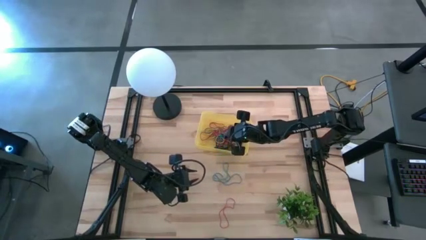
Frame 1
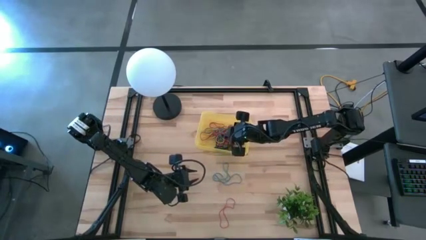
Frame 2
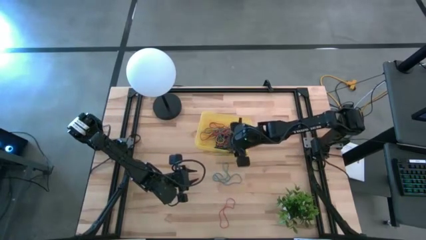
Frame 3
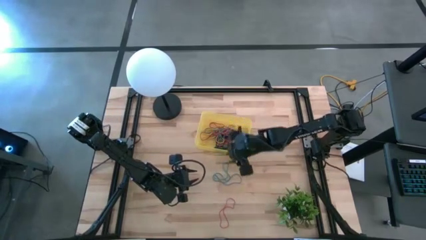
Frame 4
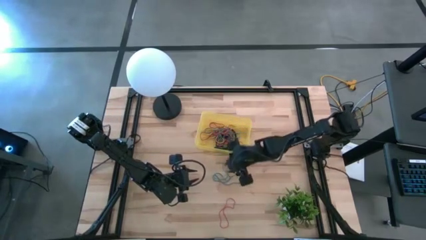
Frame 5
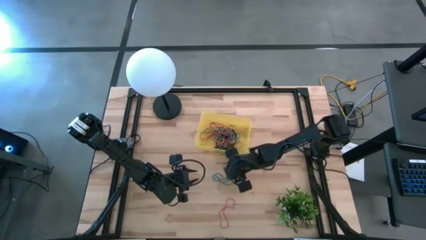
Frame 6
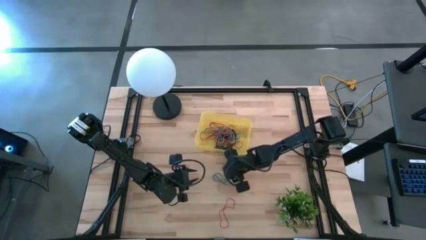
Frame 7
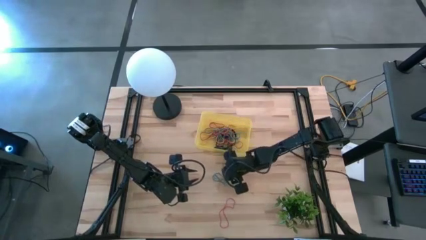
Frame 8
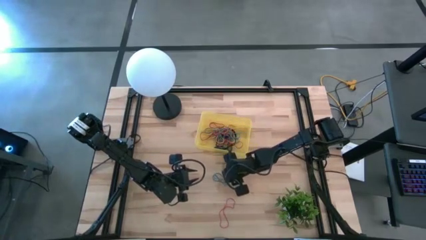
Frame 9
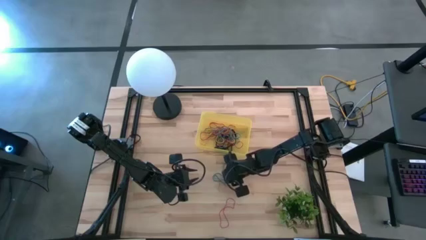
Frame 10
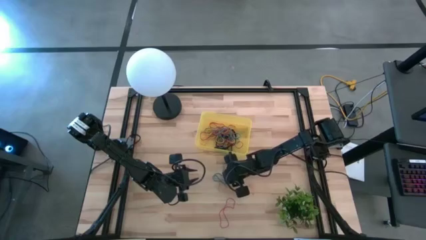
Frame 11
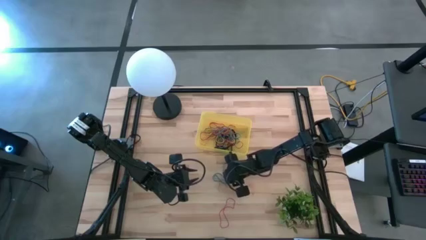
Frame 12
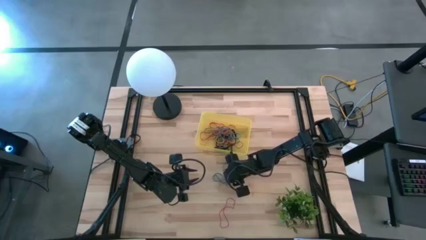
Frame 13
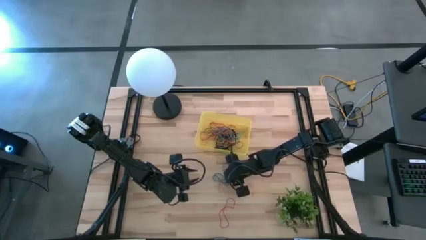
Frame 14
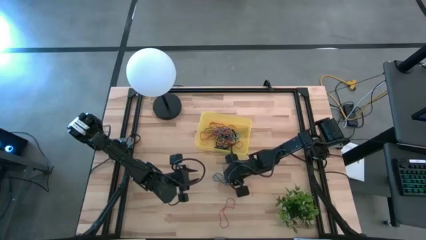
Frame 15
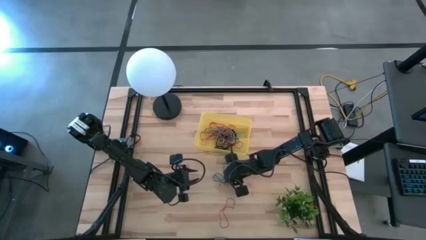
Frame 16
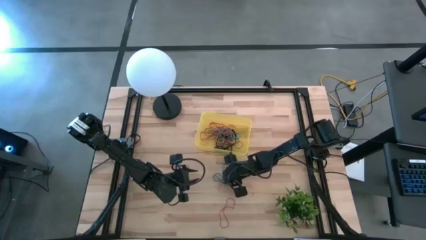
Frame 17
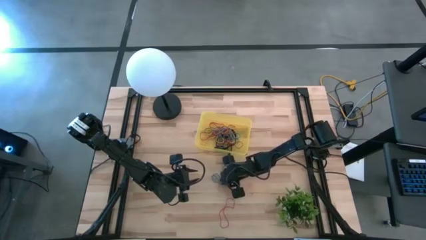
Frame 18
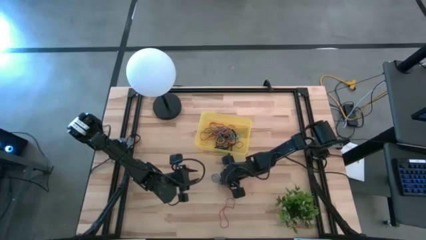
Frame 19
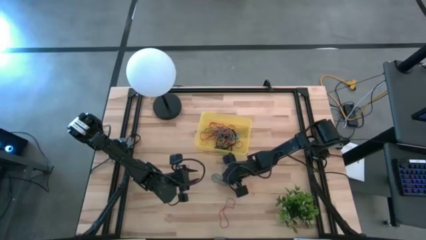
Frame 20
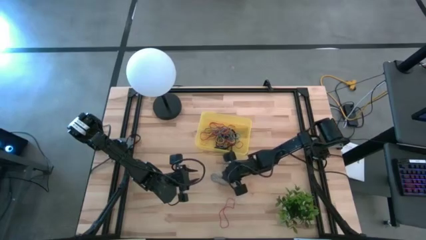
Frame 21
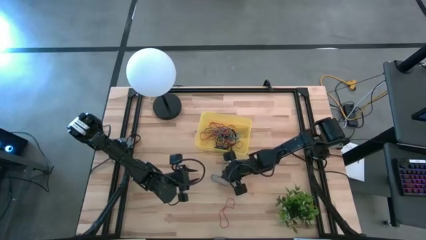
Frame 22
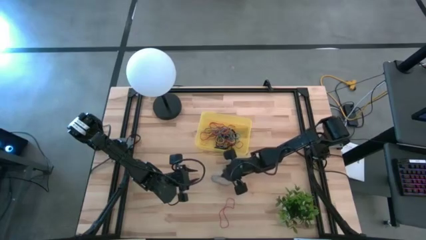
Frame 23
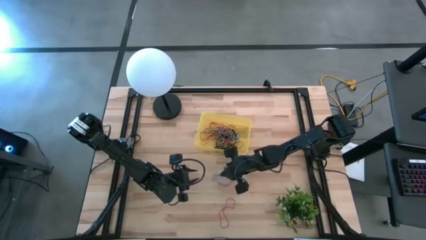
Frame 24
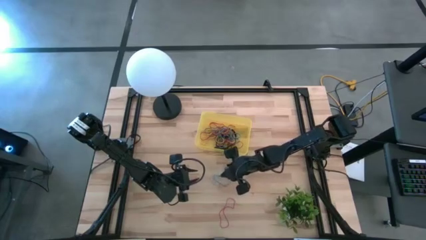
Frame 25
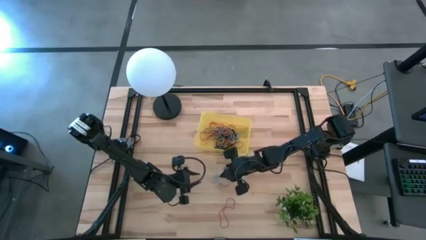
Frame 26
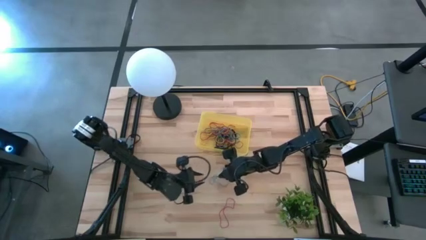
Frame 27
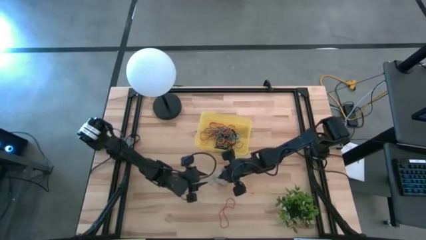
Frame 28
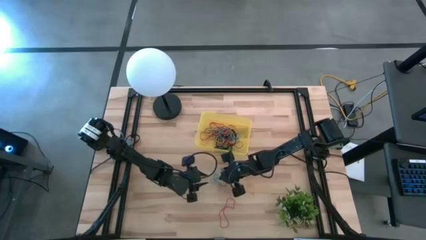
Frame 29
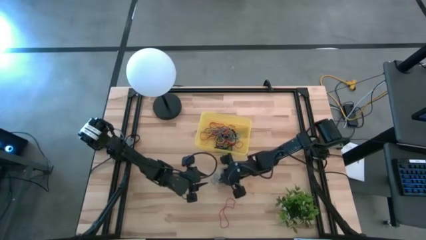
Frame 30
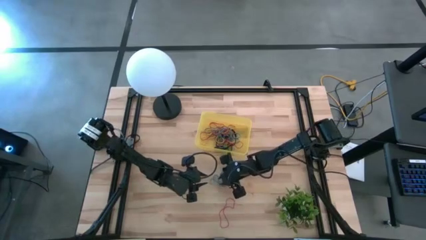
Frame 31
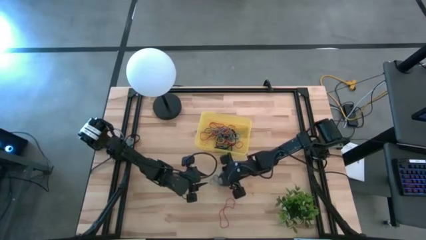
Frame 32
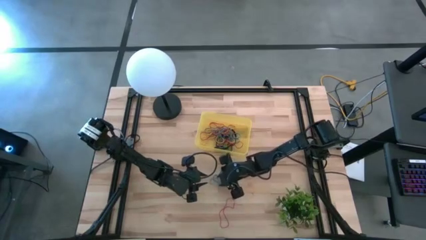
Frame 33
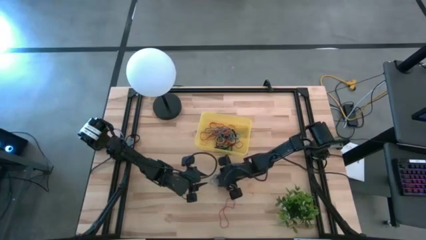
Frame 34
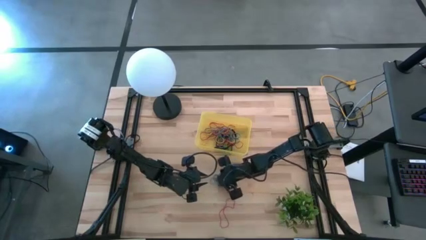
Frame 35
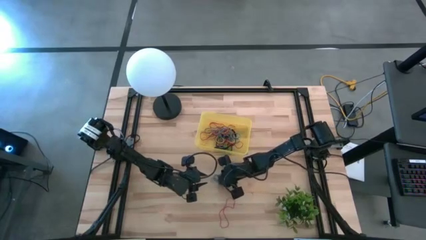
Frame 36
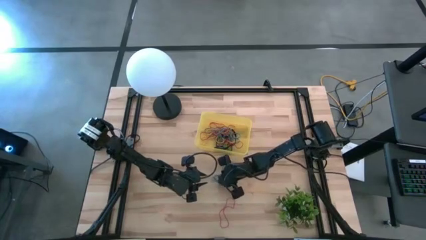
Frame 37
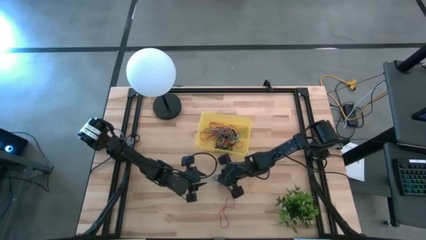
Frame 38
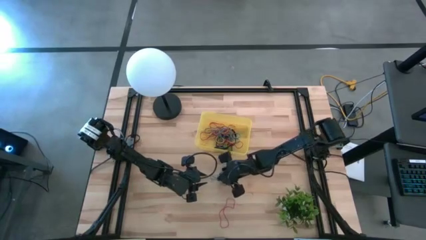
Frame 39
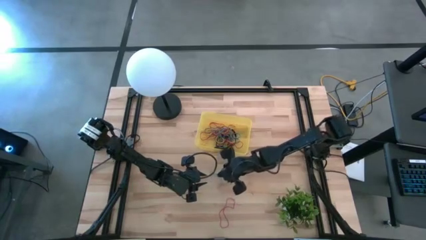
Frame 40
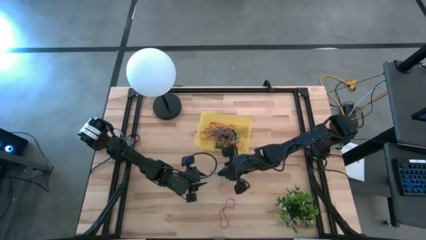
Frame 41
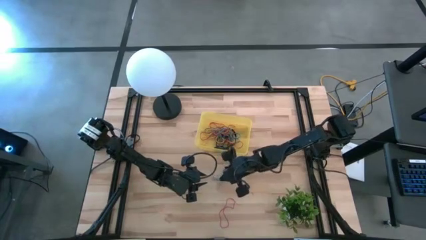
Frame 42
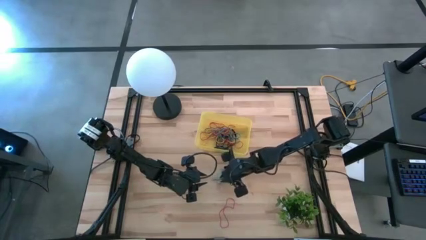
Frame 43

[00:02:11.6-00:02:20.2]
Task: Pick and place rubber bands into bin
Put the blue rubber band into the yellow bin

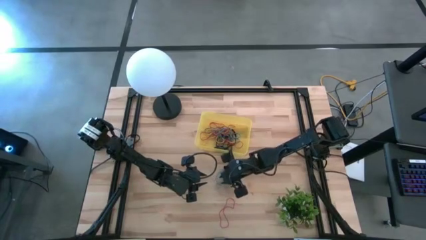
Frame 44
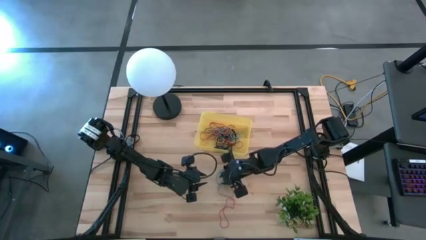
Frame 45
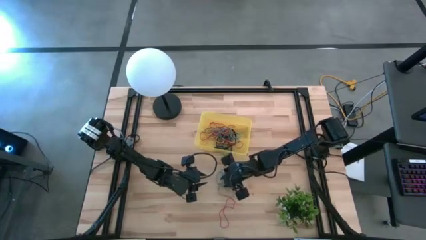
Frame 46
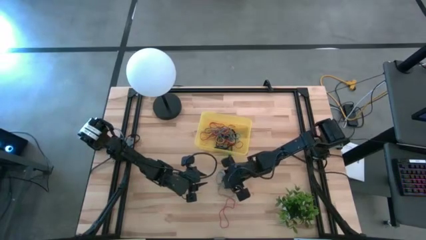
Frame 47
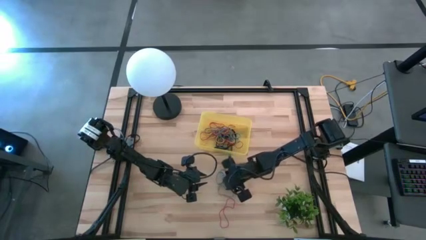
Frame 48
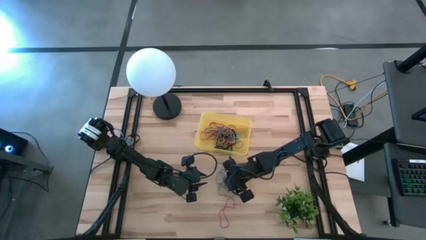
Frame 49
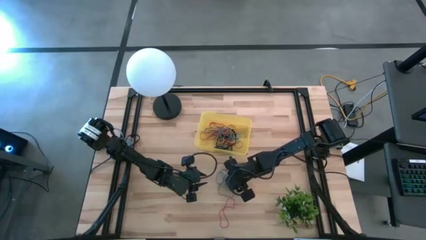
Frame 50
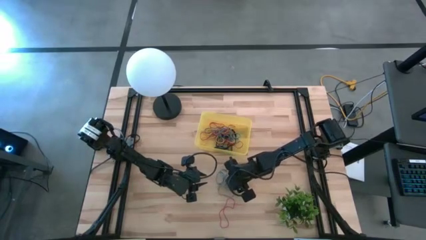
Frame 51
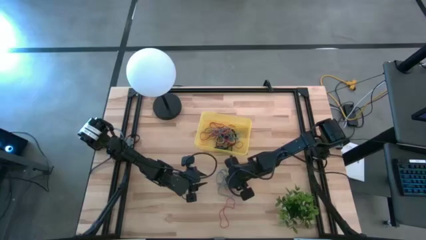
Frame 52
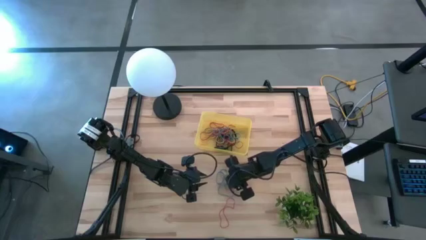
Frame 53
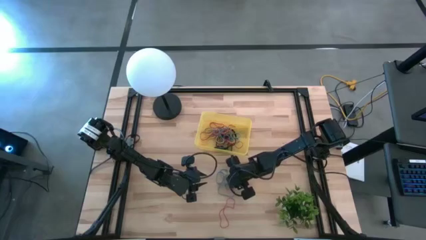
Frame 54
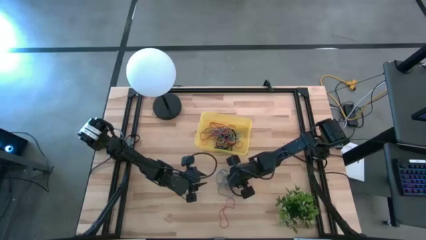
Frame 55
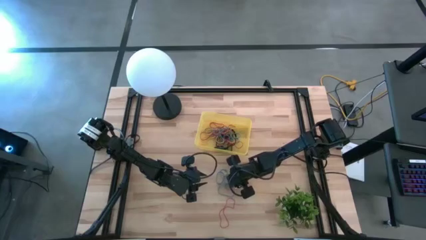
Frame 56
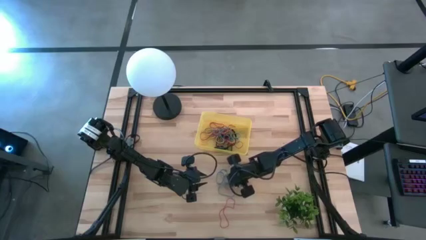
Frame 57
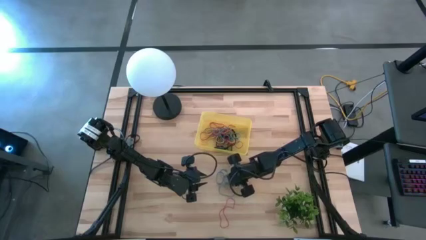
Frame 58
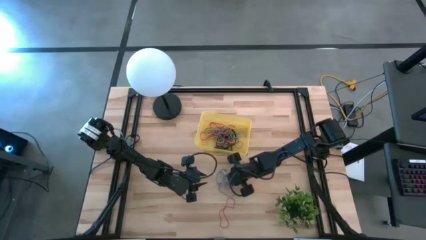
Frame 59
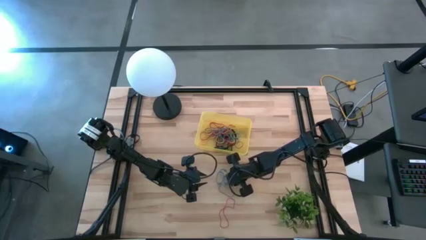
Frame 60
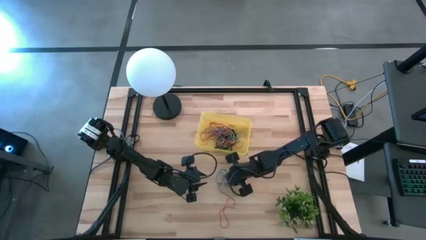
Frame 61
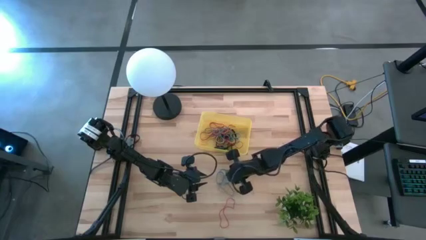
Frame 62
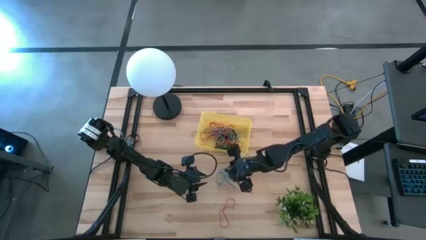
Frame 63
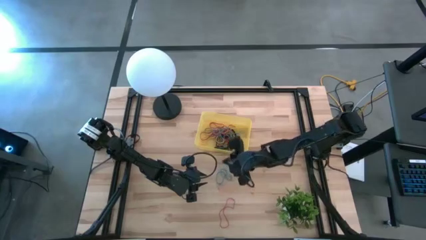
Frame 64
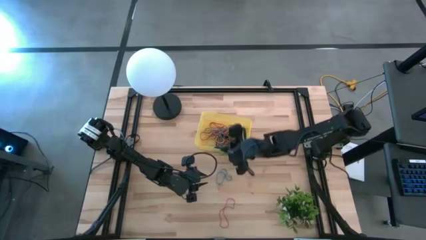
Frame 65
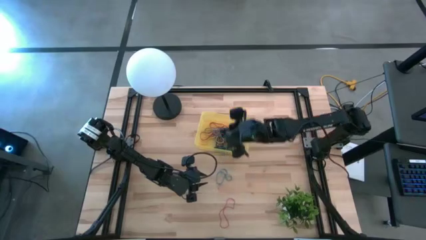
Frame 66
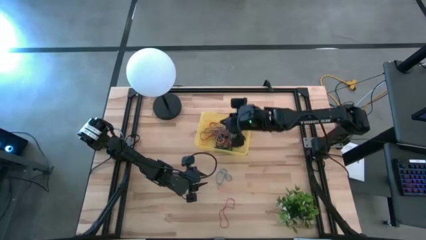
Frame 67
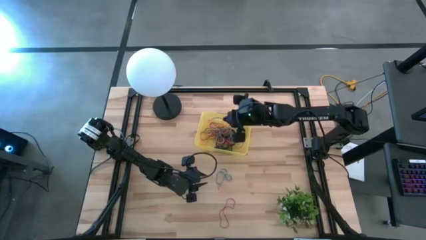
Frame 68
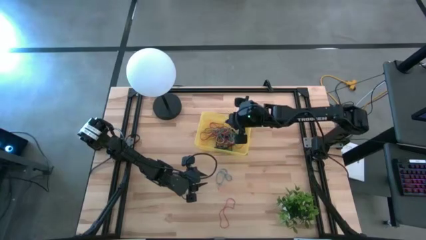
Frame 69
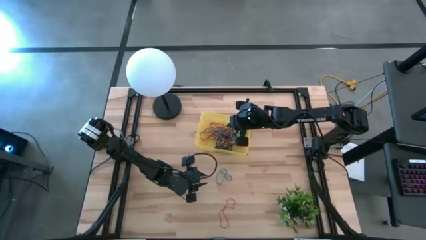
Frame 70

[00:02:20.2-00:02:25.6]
Put the blue rubber band into the yellow bin

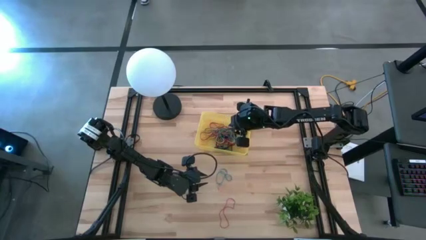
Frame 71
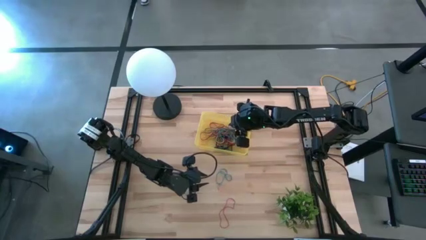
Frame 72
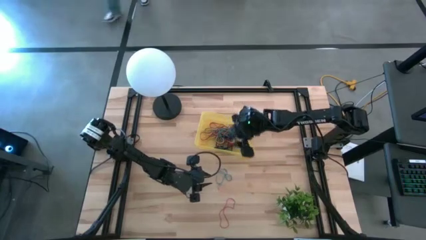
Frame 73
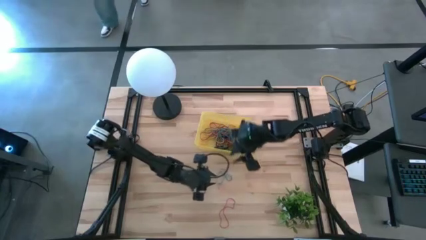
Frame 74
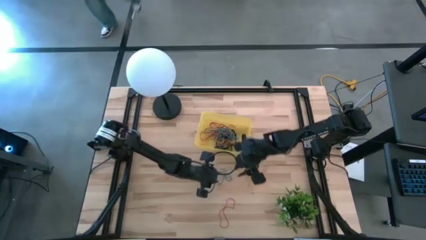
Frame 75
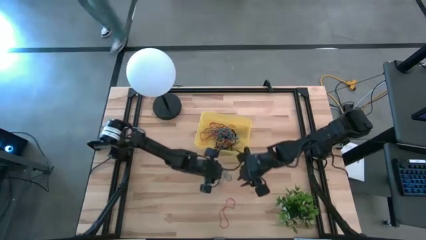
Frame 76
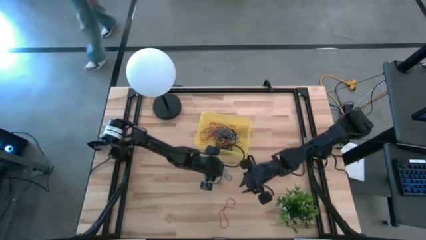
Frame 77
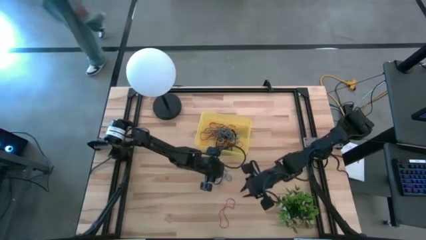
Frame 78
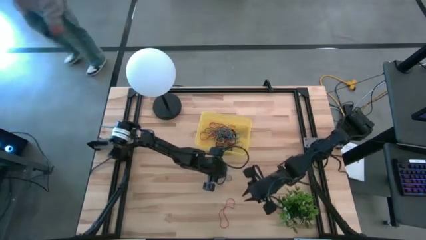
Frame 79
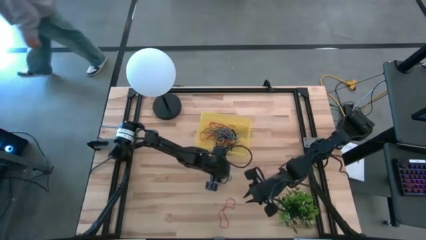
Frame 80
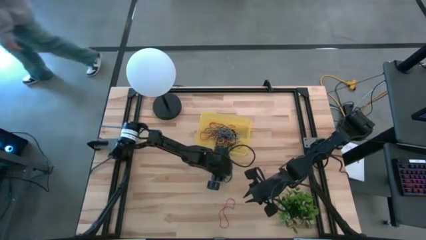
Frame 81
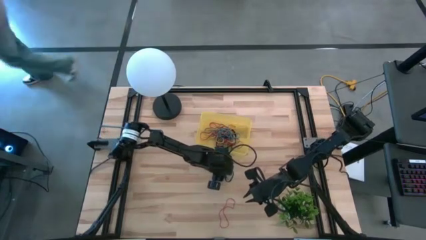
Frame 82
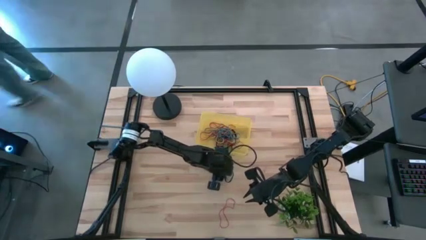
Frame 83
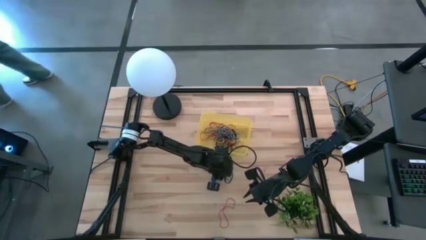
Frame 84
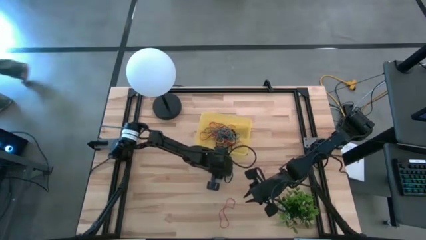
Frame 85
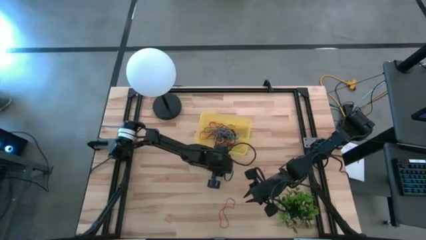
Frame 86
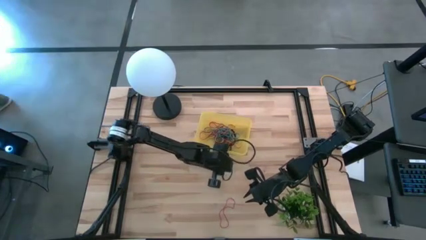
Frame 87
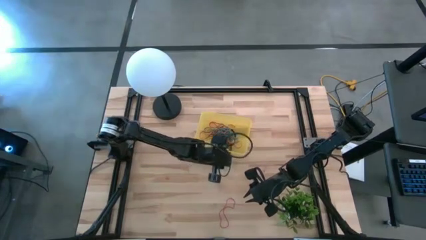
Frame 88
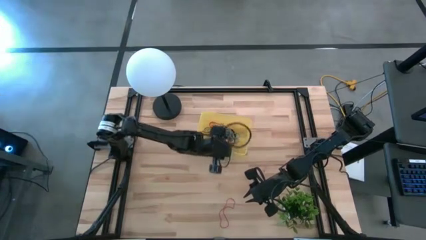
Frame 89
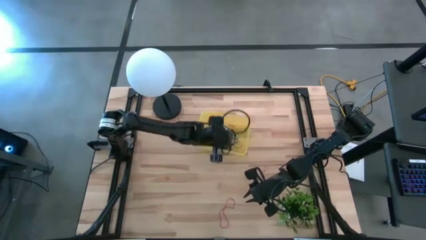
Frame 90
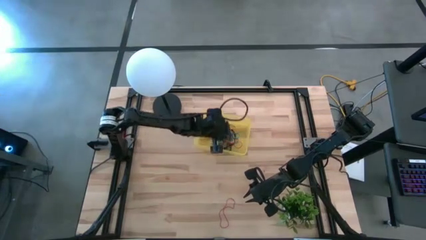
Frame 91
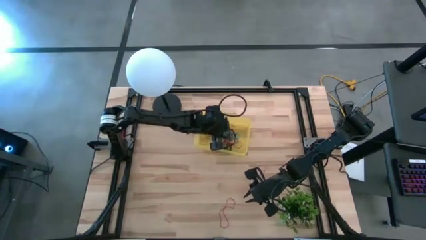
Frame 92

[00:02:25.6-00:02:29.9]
Put the blue rubber band into the yellow bin
